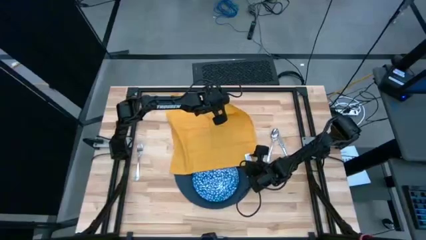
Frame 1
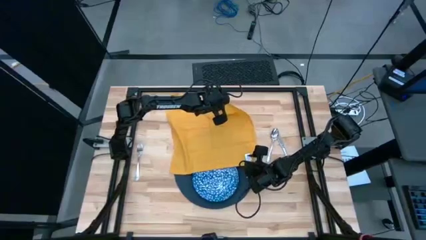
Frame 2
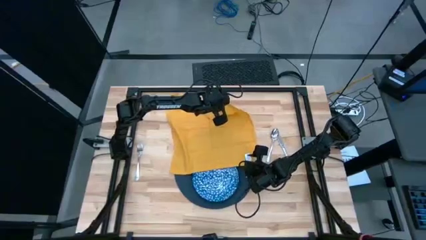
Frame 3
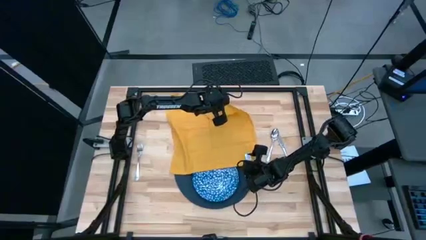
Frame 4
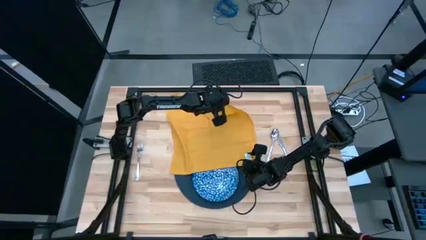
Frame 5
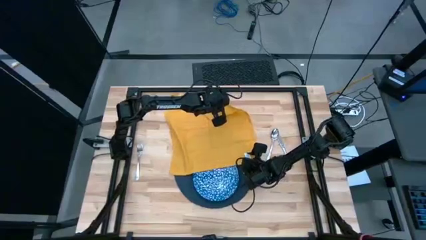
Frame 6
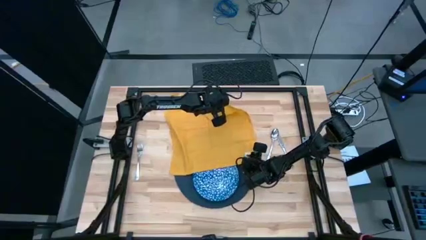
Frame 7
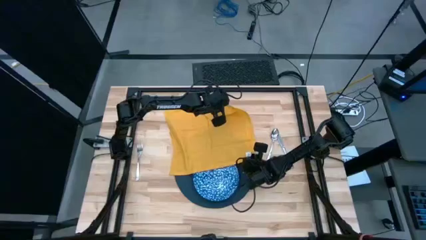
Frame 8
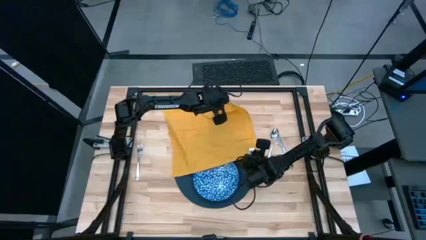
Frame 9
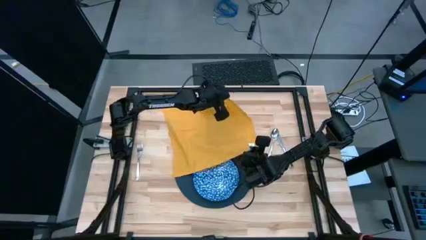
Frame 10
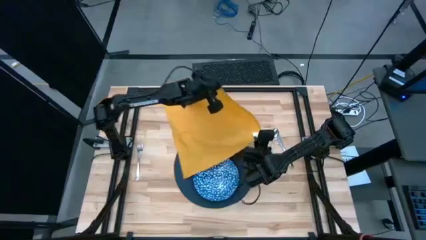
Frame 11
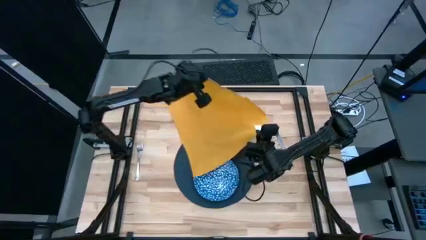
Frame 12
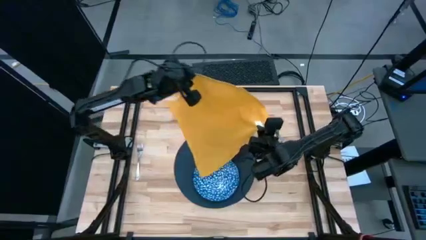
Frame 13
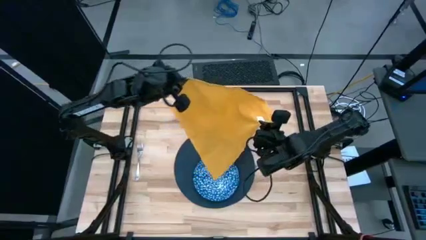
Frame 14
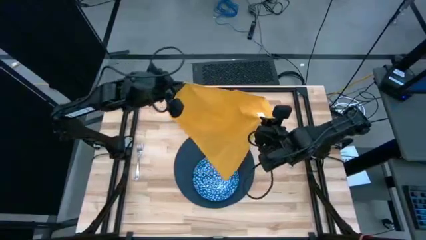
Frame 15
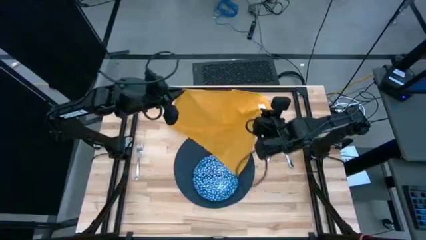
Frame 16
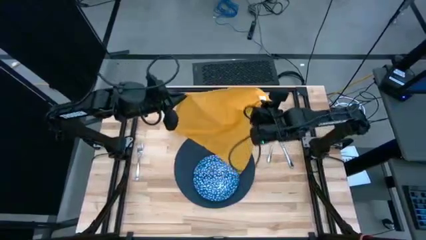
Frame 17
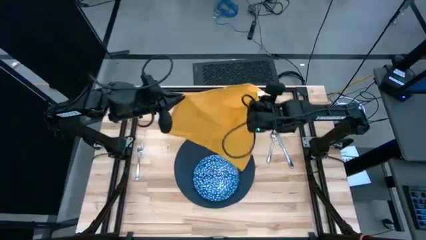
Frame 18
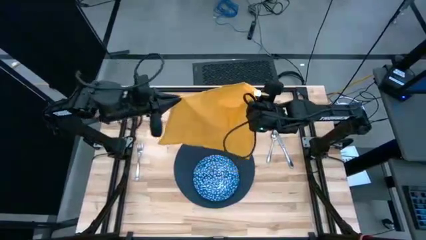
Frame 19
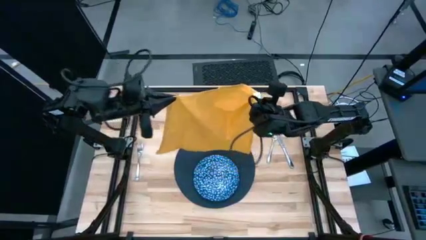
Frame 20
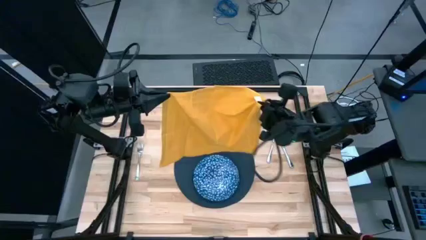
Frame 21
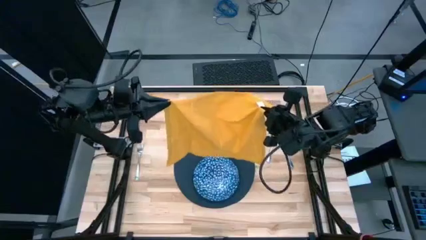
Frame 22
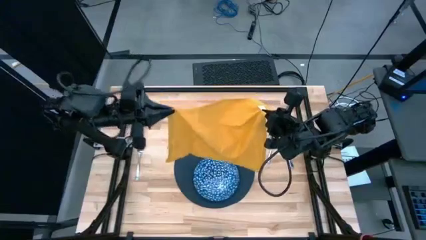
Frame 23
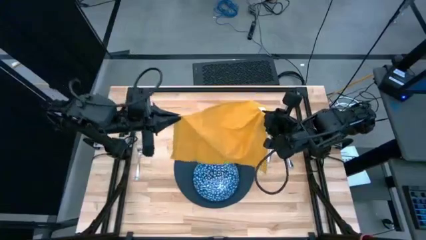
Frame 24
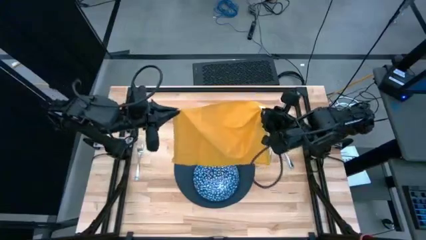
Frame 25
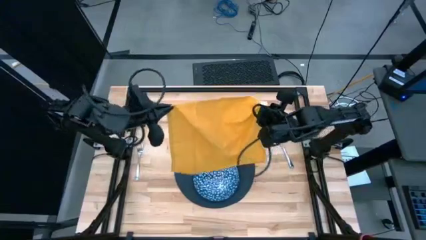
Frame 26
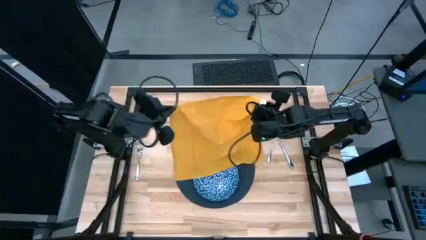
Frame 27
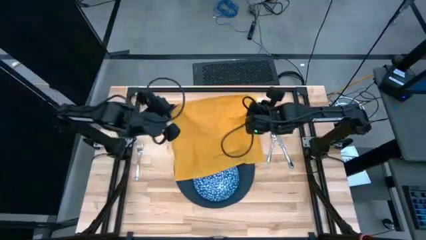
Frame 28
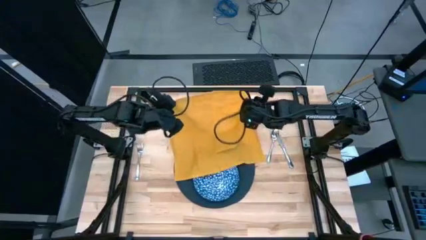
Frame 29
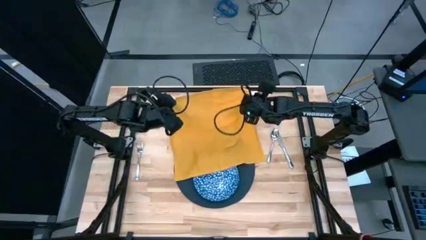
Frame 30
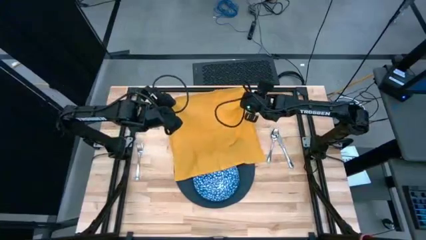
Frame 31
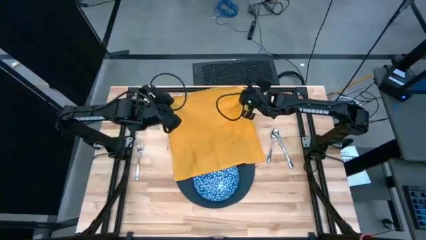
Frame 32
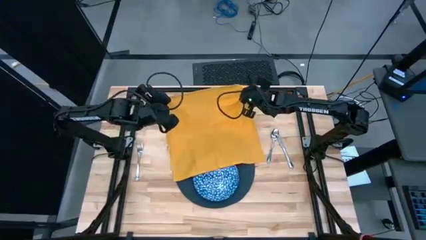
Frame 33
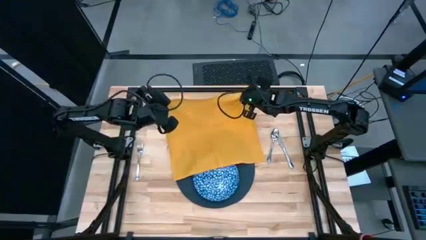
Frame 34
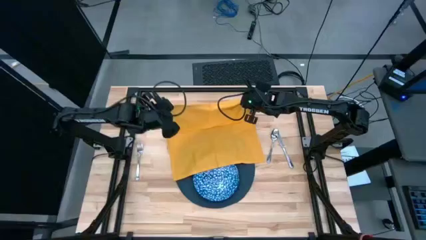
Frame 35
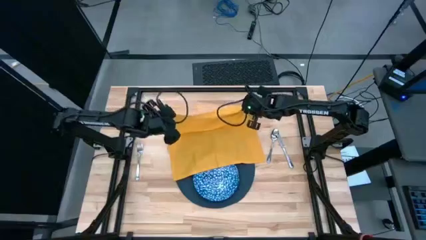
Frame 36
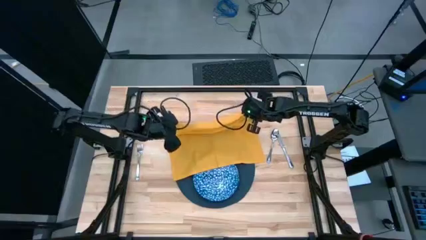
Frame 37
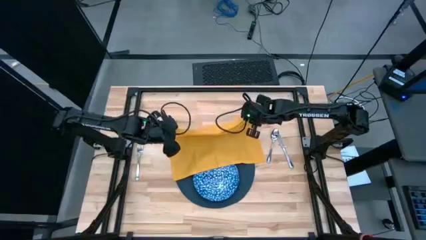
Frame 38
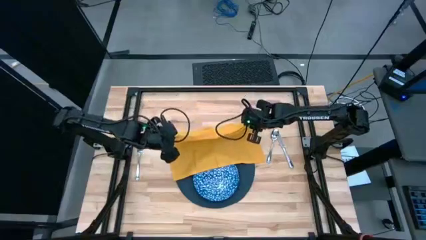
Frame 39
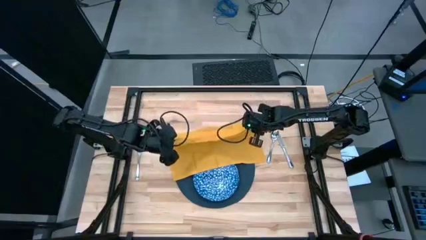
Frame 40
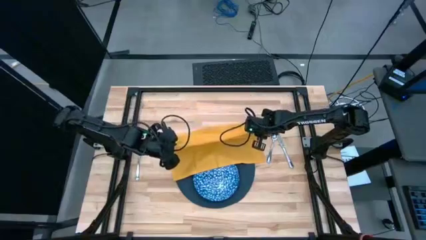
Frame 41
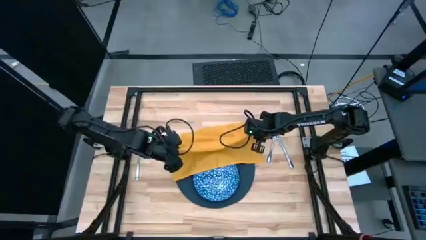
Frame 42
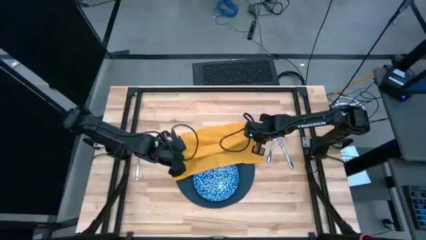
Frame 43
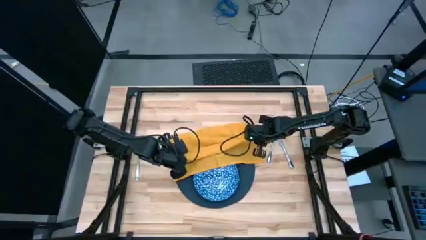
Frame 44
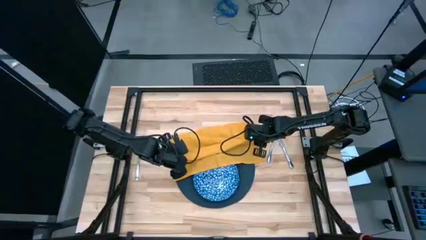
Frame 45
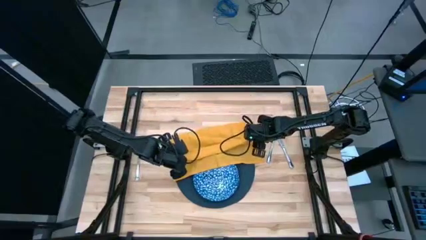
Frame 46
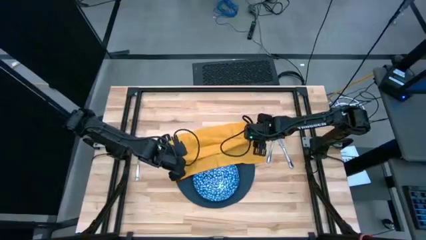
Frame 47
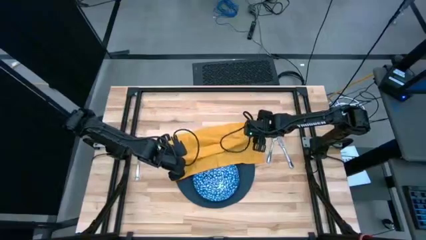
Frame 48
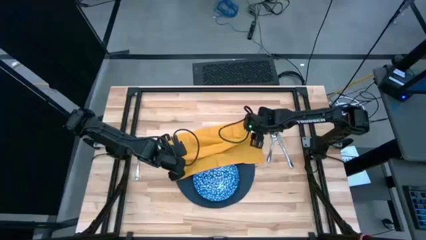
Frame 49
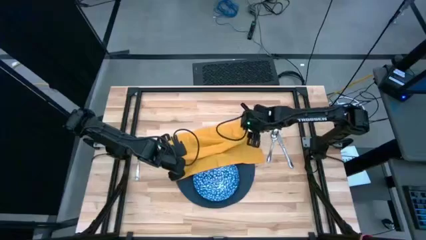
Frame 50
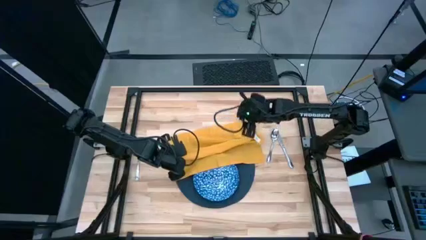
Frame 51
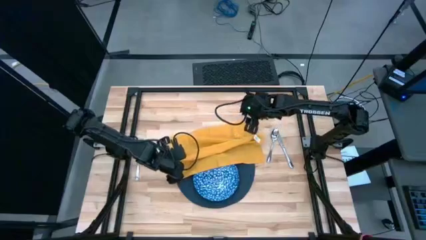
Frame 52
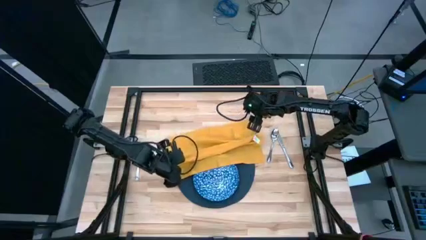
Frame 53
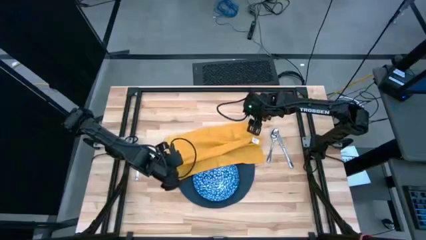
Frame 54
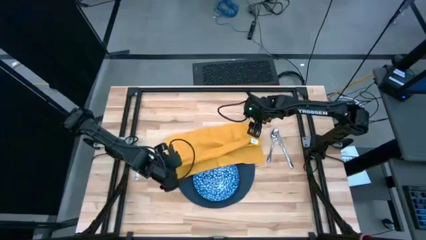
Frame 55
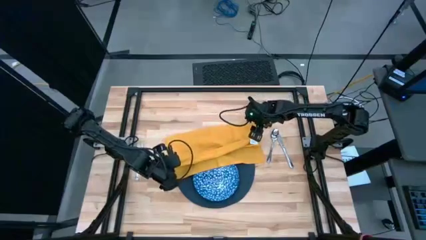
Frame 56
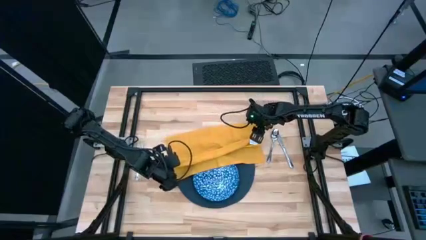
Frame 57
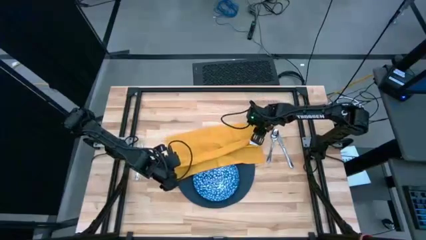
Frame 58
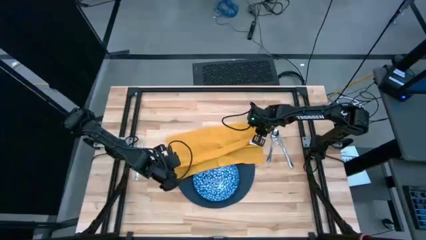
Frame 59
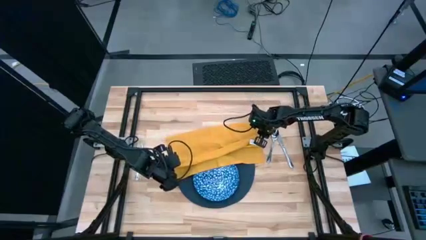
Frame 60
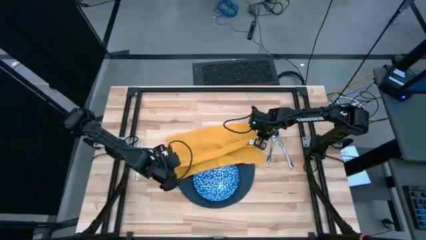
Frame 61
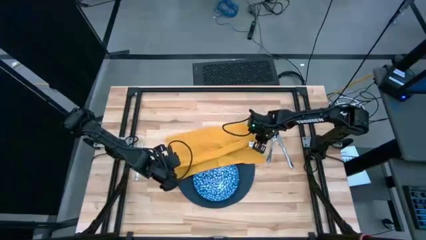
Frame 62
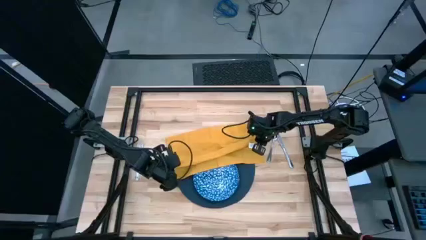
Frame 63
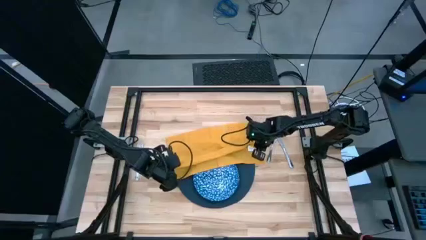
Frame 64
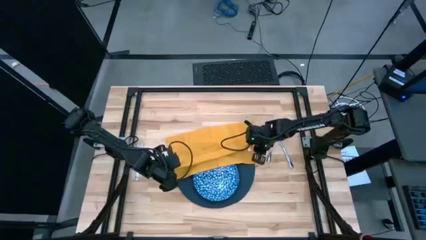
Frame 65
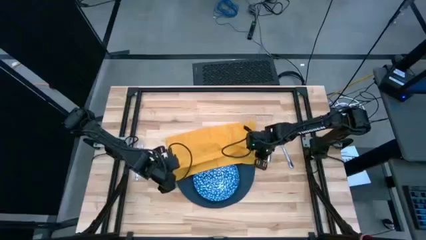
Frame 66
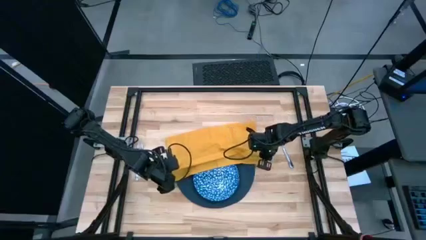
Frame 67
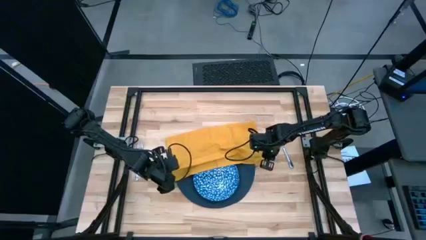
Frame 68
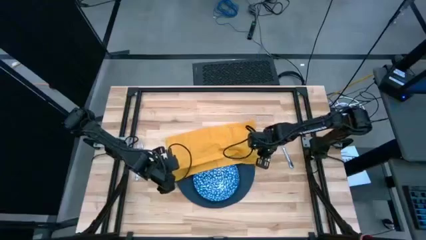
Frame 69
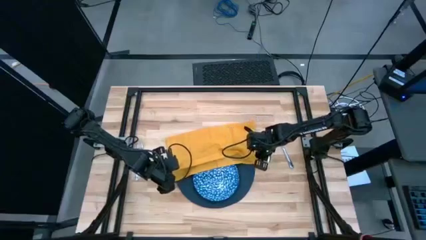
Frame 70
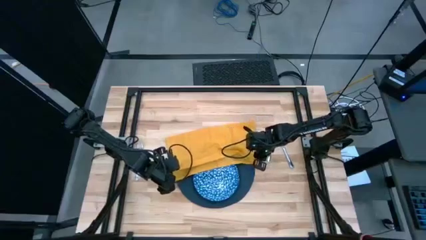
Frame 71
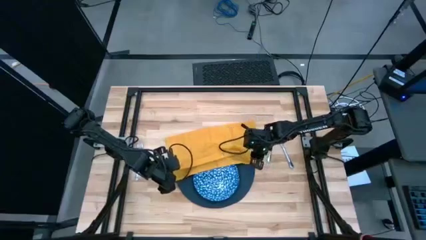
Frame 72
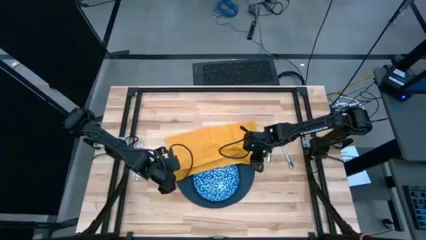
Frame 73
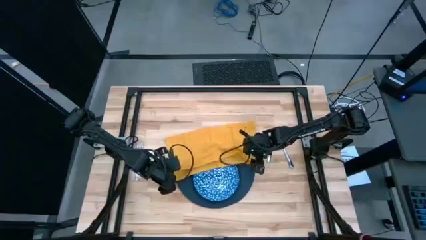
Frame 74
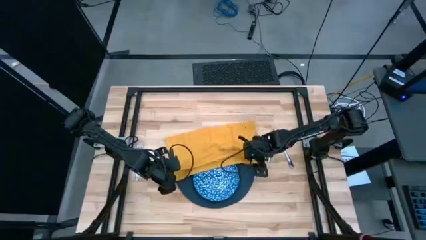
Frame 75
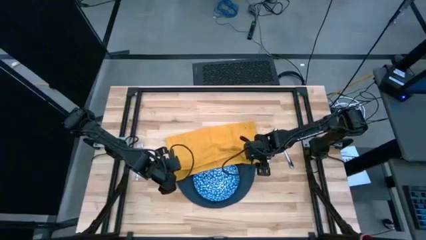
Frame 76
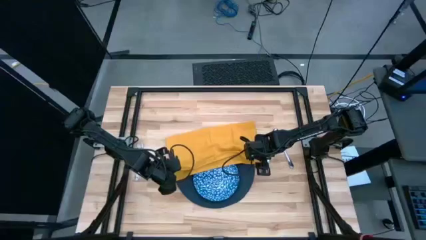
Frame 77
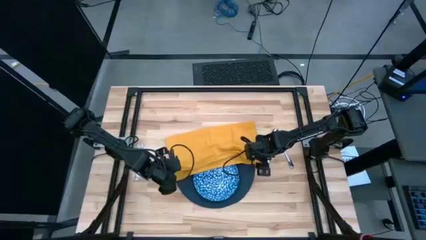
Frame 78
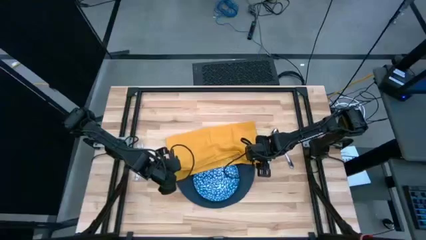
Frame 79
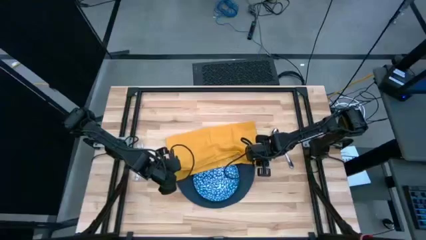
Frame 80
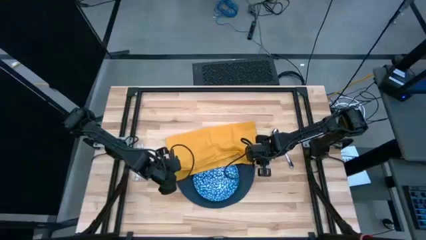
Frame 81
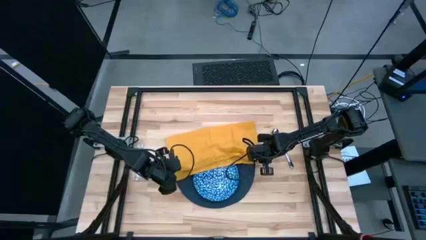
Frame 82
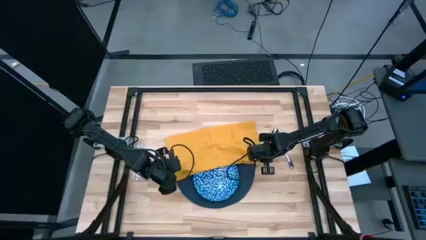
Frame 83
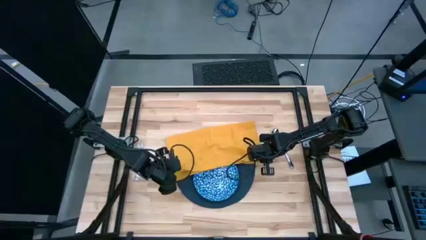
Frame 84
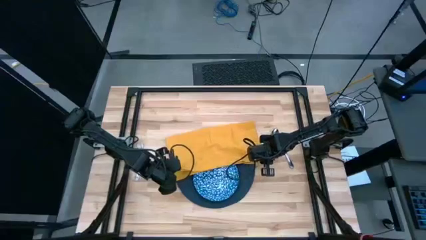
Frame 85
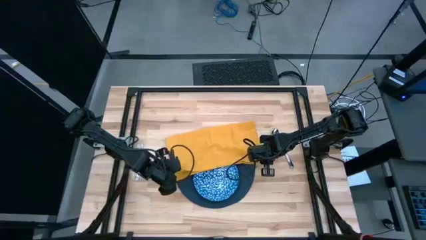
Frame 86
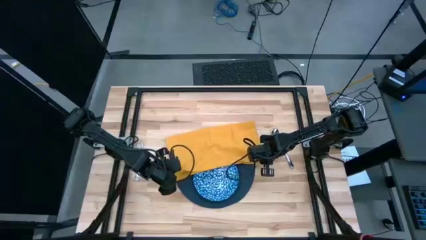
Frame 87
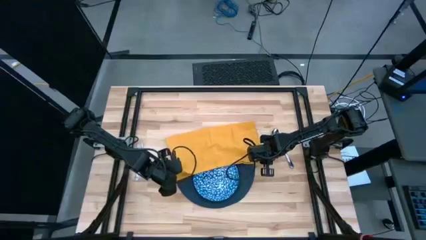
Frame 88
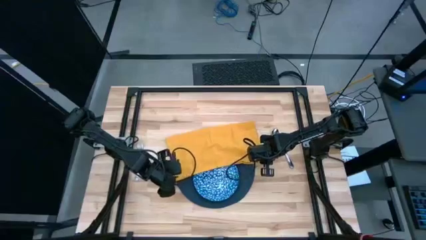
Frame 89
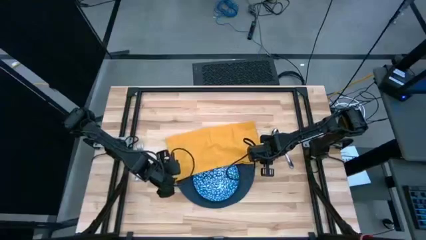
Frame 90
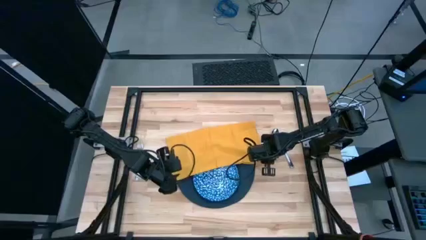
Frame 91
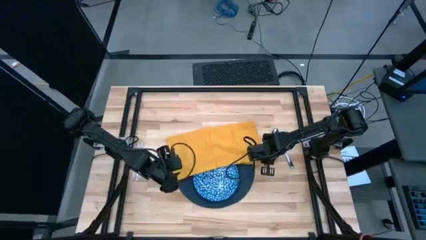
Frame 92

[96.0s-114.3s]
Task: Set table place
Fold the yellow table napkin
